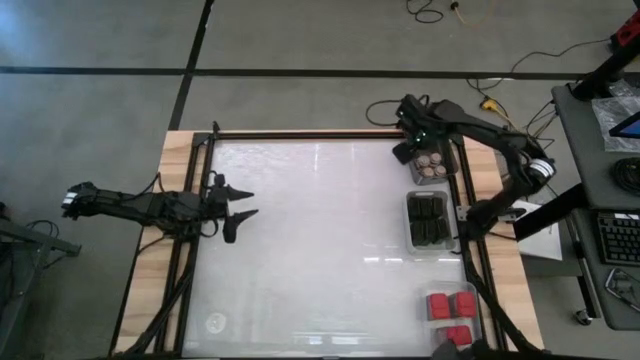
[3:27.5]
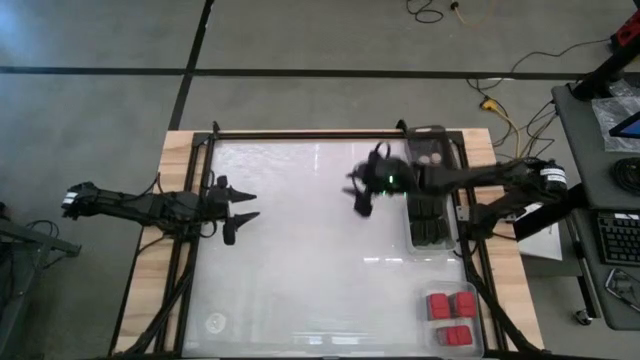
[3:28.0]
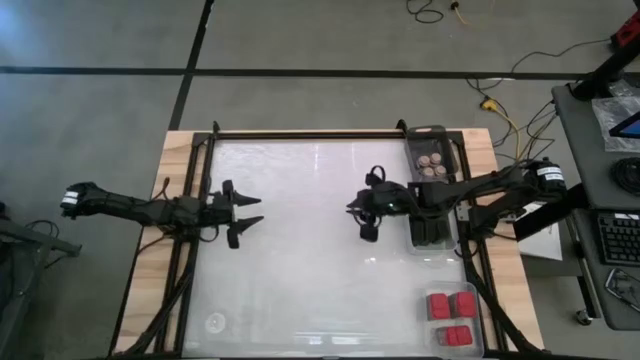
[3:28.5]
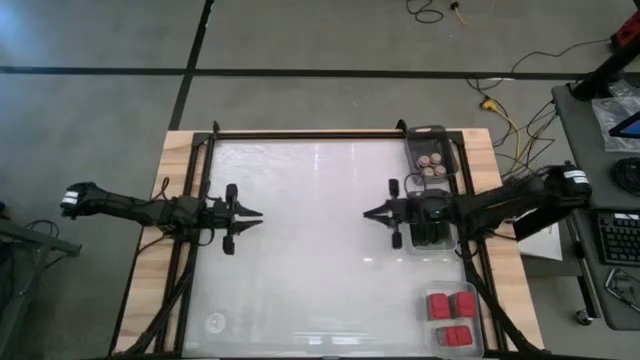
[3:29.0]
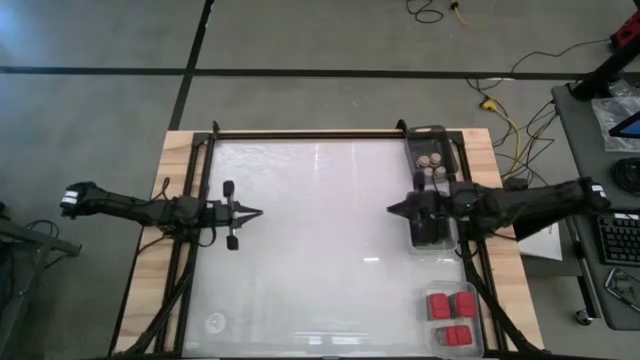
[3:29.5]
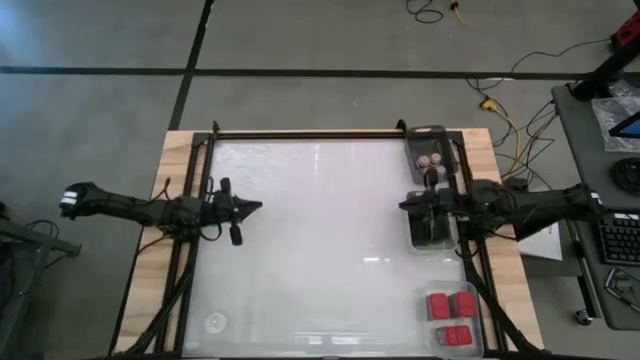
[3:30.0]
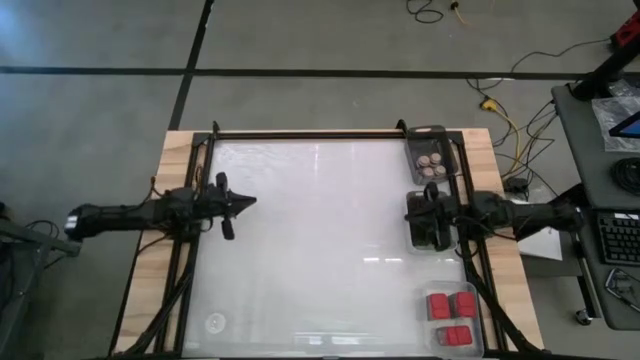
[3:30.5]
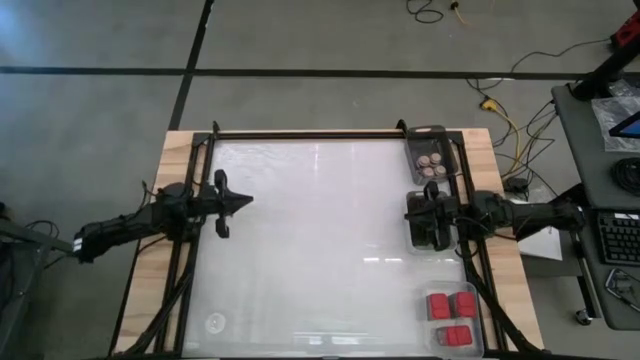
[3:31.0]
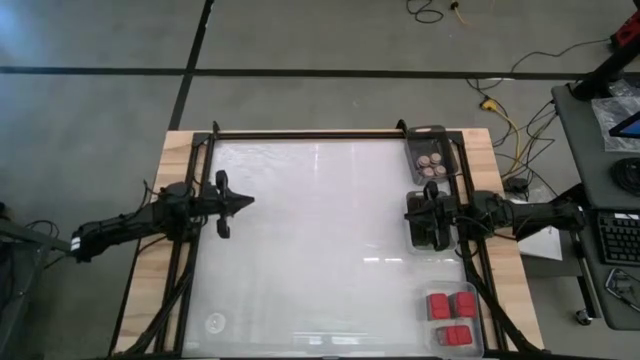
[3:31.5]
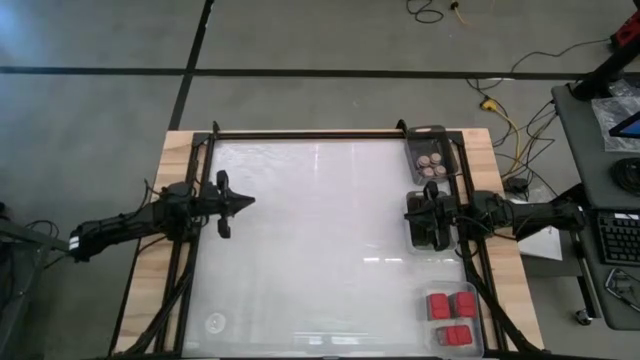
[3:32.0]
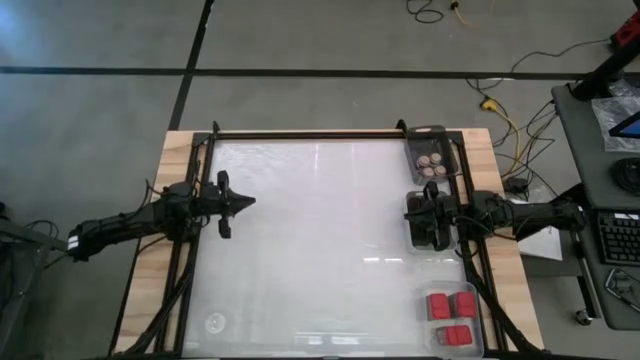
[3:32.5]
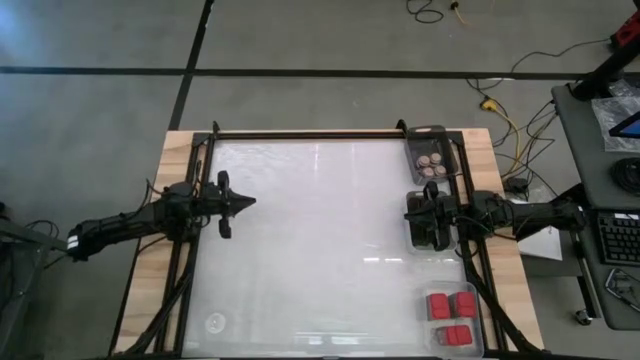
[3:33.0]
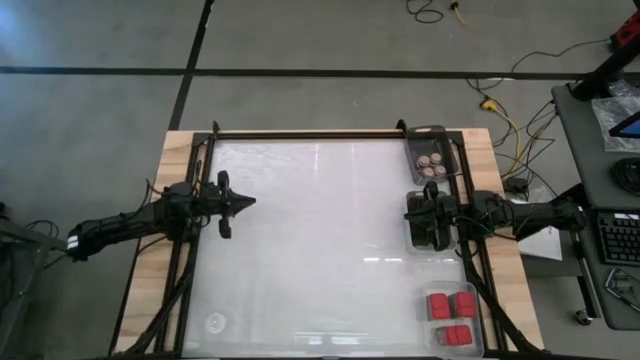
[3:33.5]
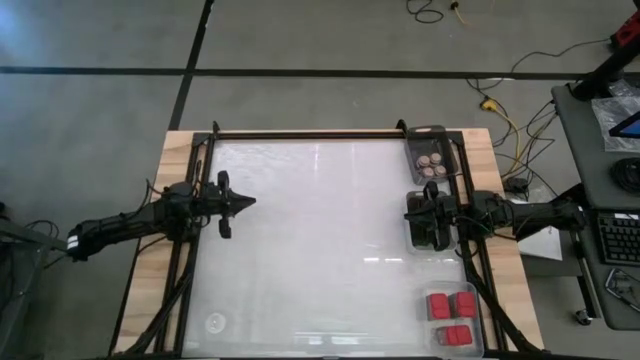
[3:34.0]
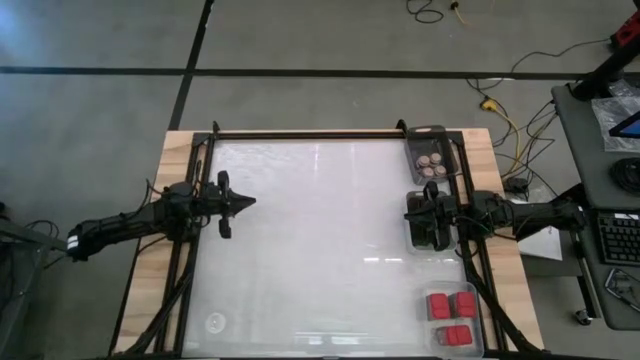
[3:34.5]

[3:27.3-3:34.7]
Task: Sort spices by type
Return to Home Position

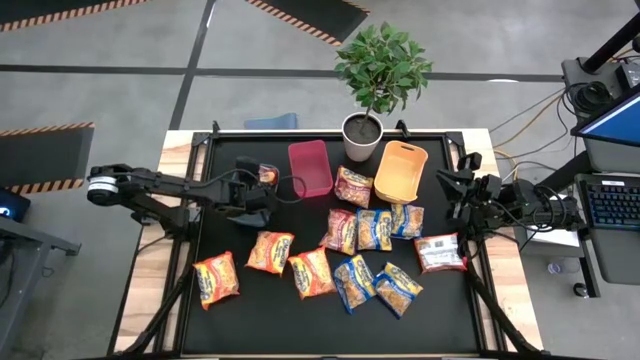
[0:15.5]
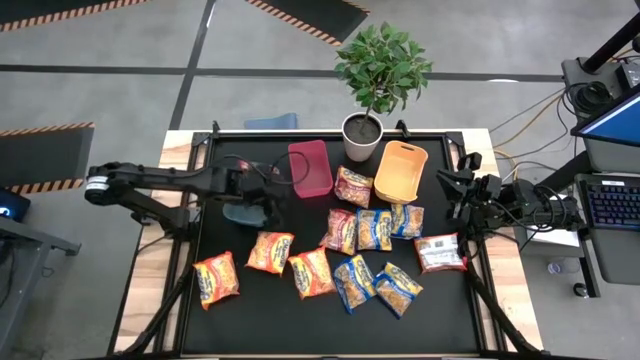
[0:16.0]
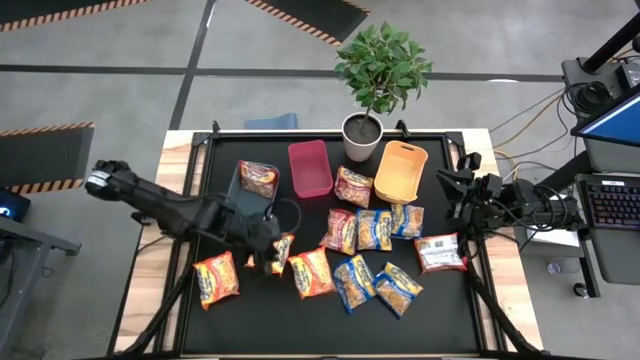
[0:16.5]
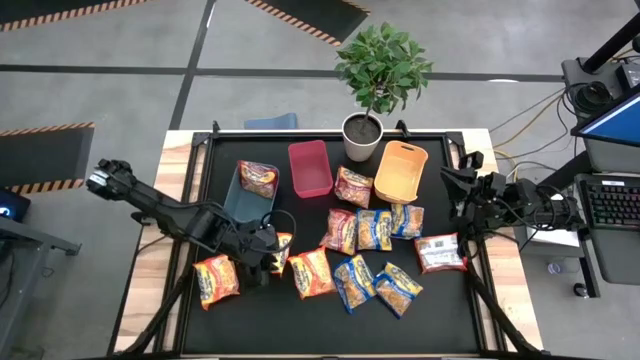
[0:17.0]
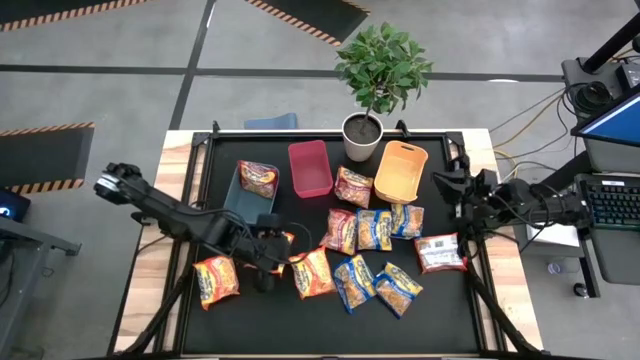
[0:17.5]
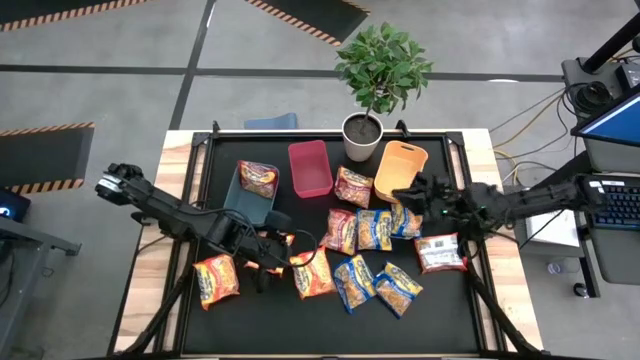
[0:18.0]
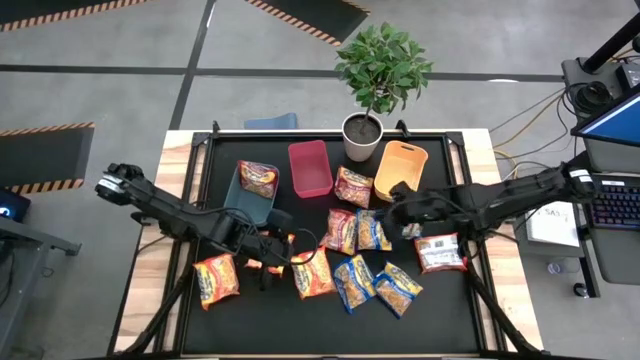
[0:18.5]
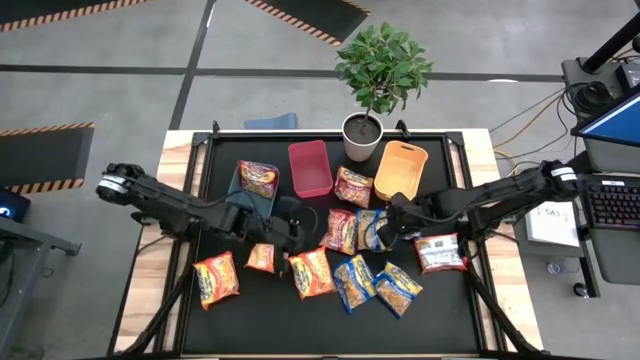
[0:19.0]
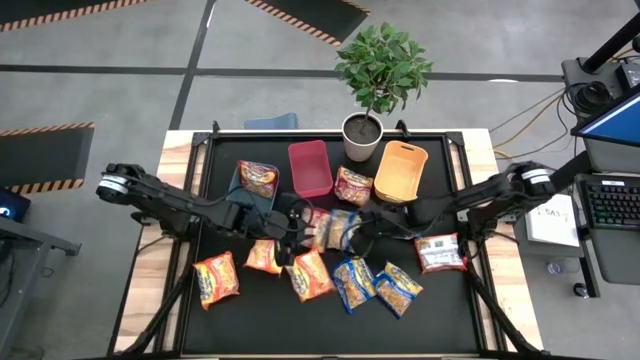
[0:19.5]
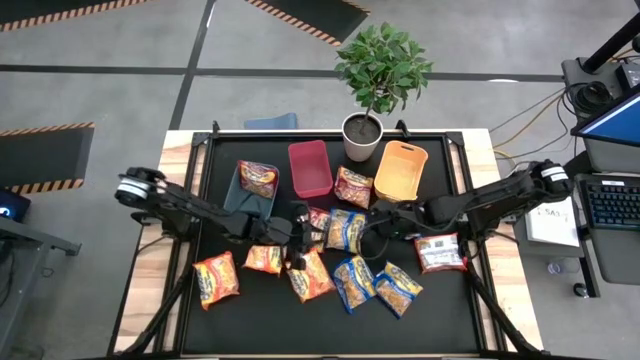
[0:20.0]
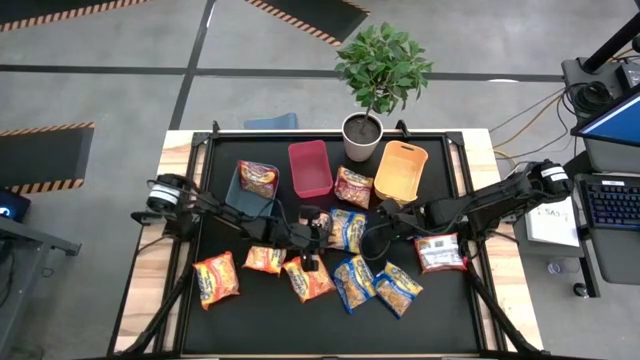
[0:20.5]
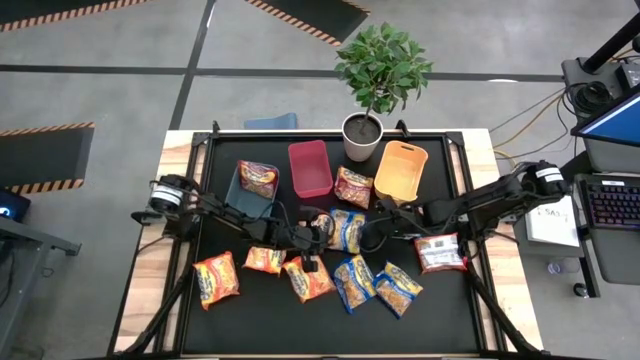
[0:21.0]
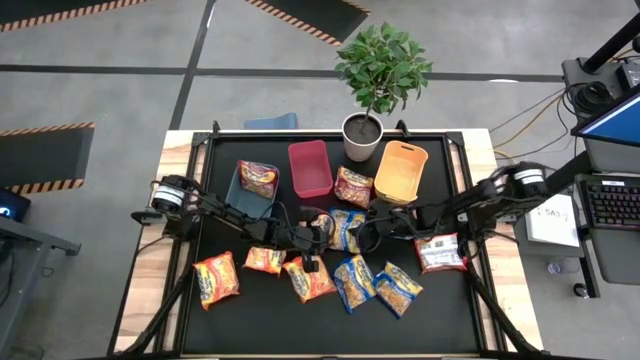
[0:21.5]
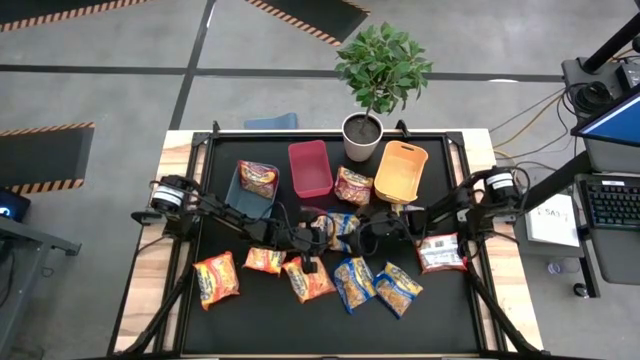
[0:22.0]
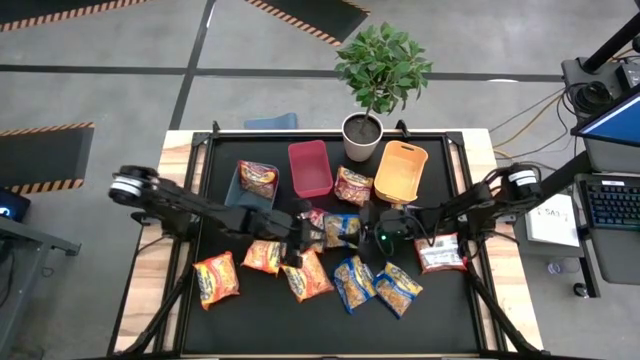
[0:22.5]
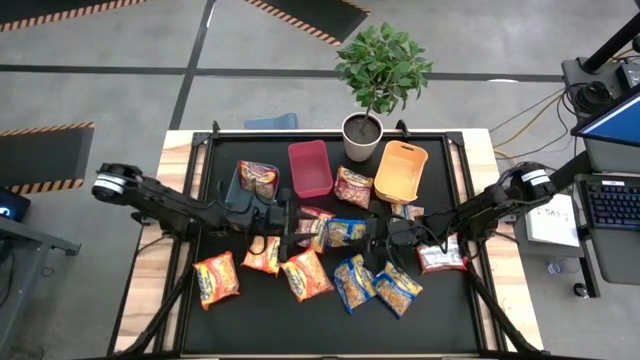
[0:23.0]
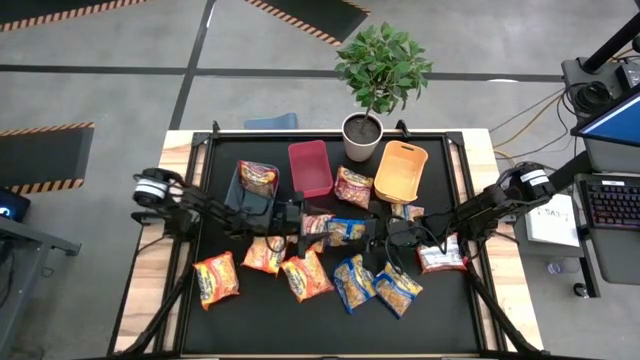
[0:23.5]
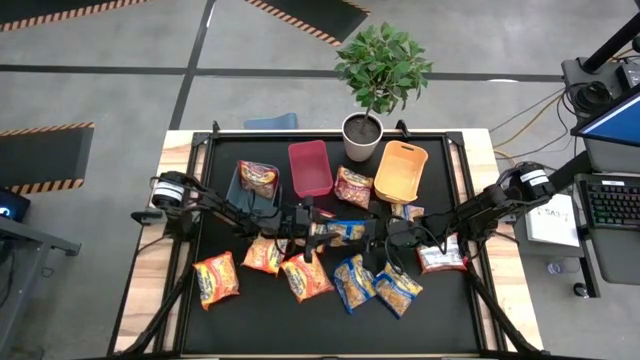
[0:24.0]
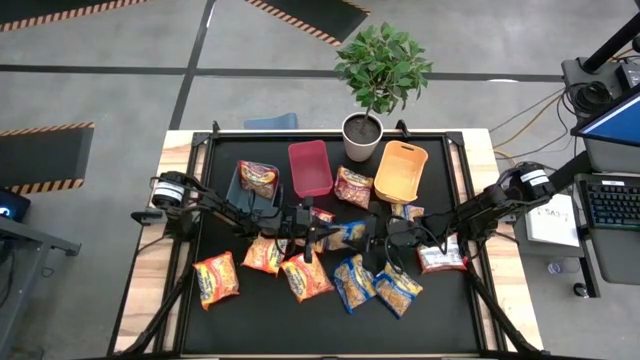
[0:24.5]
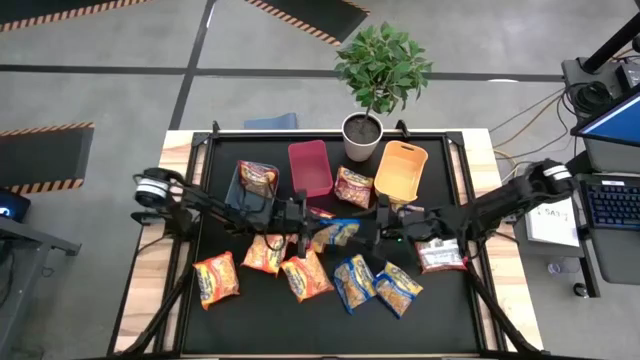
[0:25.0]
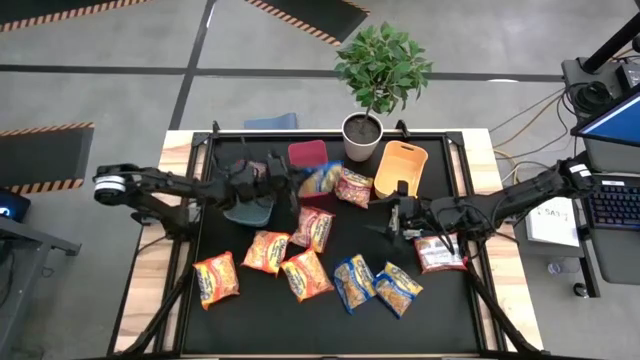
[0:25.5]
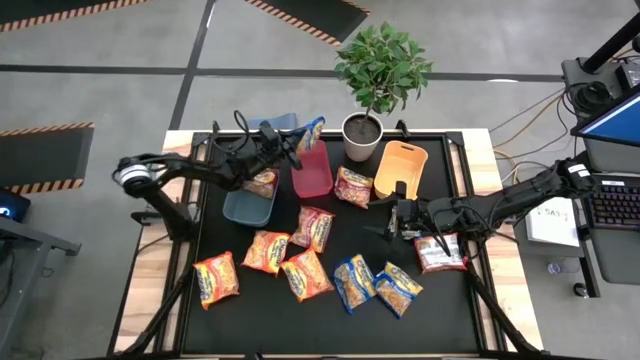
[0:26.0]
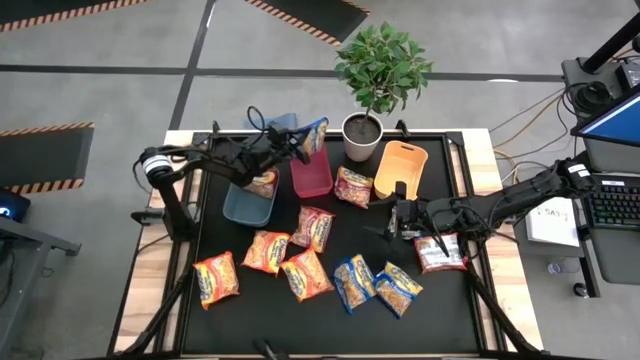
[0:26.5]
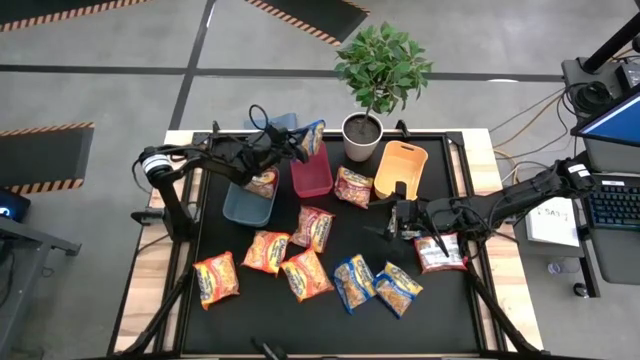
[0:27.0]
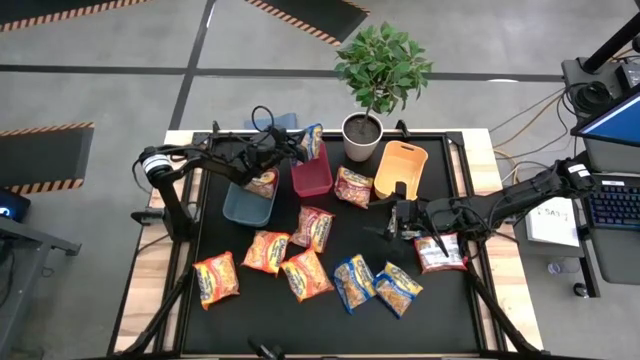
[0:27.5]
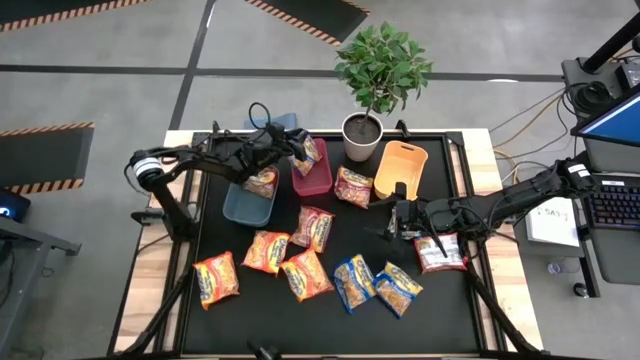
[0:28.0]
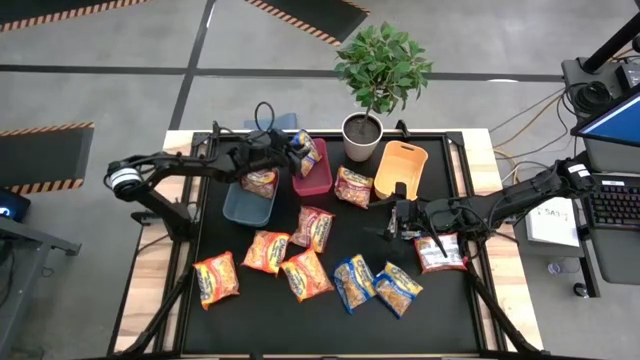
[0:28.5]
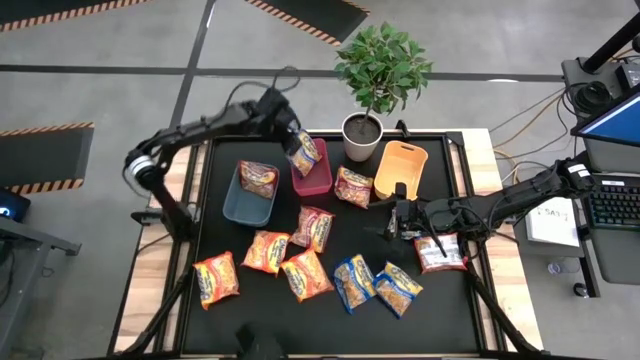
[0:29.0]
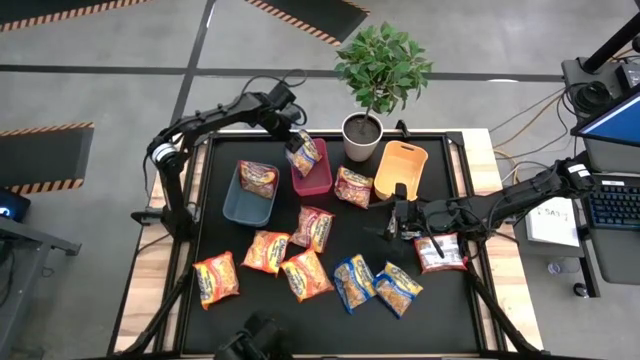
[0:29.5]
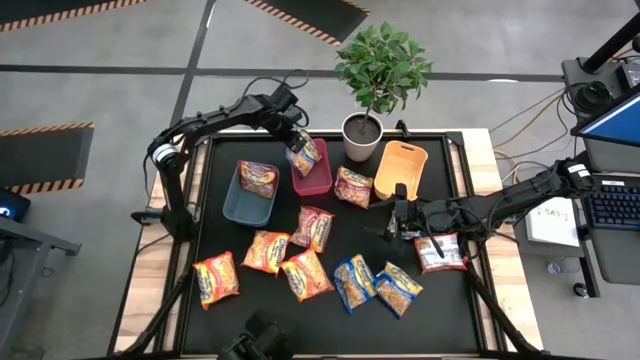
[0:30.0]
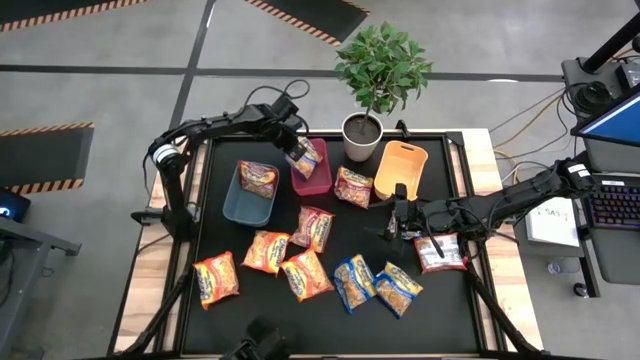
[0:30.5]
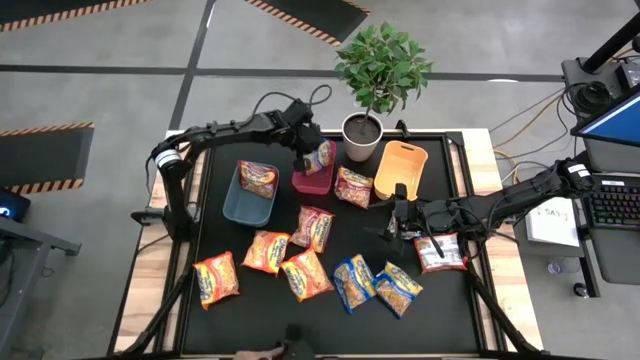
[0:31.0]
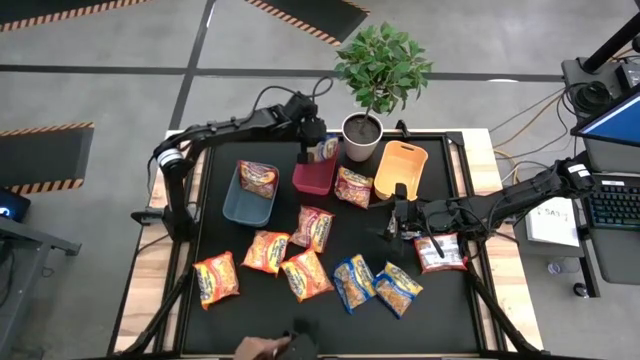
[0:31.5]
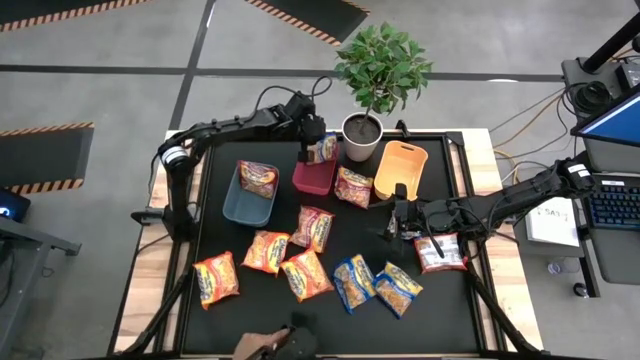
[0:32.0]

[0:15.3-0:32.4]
Task: Sort Maruchan noodles
Put the blue noodle pack into the red bin
